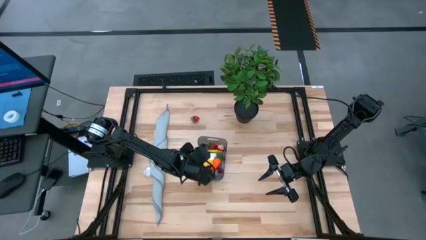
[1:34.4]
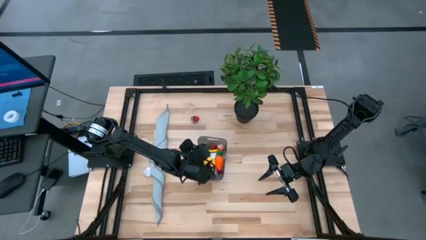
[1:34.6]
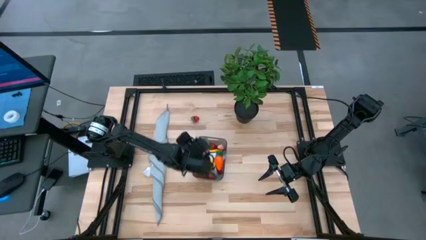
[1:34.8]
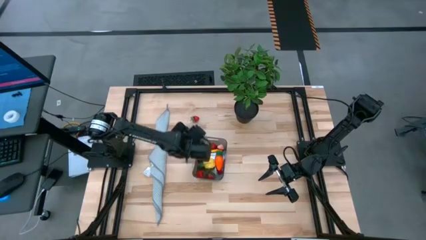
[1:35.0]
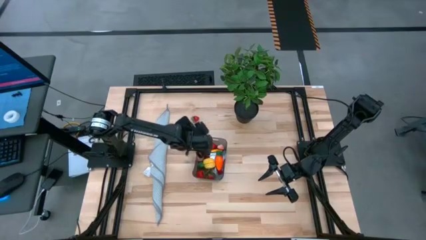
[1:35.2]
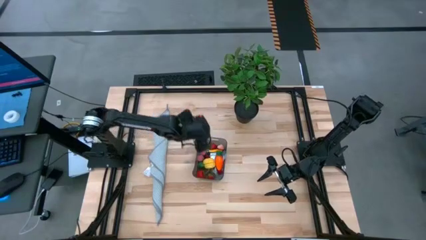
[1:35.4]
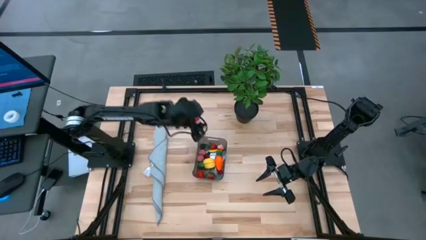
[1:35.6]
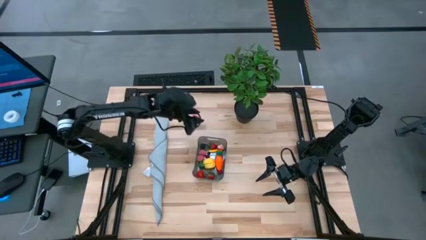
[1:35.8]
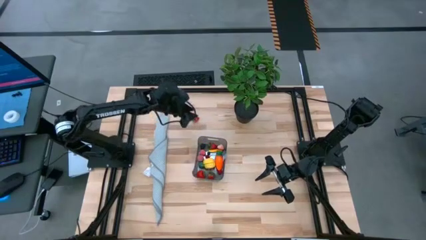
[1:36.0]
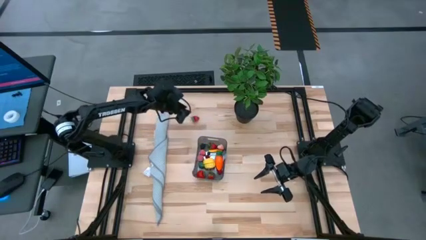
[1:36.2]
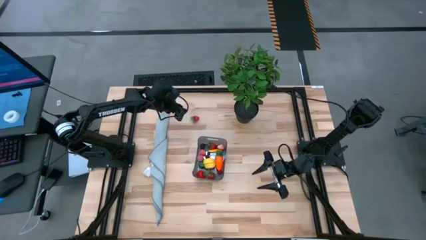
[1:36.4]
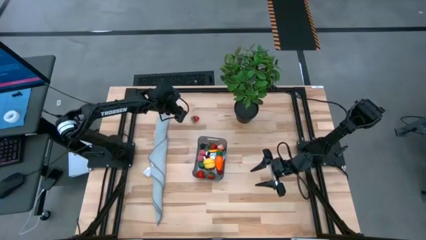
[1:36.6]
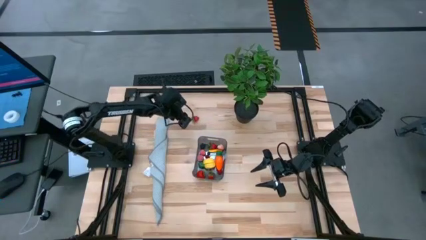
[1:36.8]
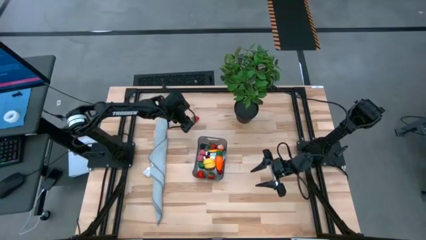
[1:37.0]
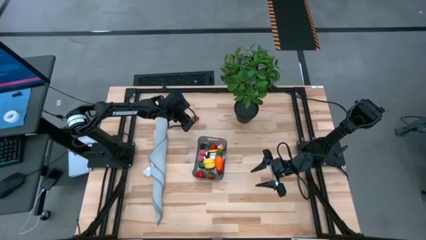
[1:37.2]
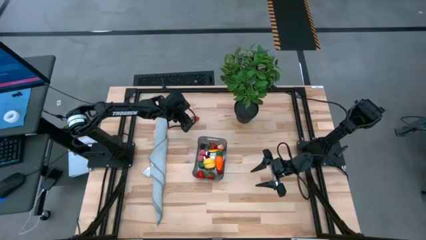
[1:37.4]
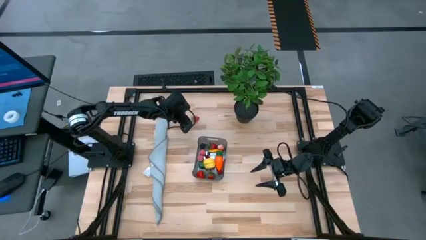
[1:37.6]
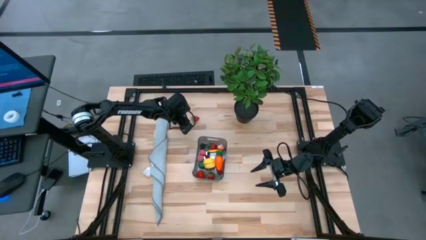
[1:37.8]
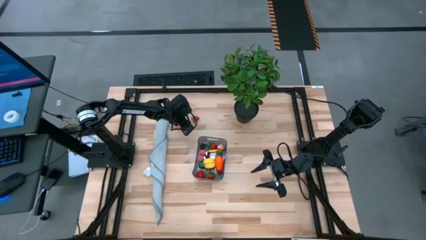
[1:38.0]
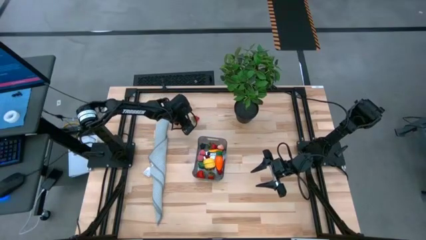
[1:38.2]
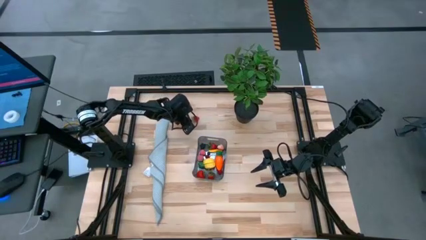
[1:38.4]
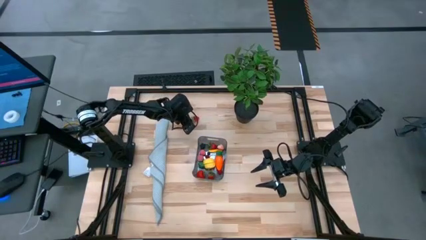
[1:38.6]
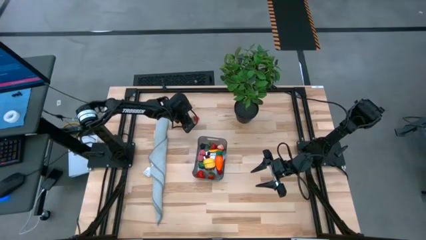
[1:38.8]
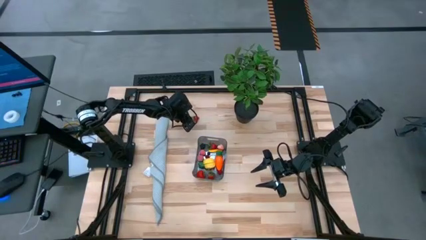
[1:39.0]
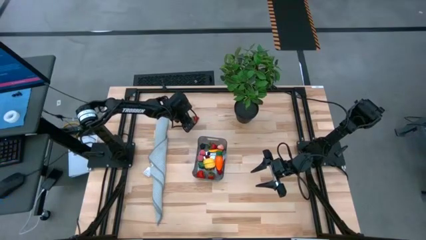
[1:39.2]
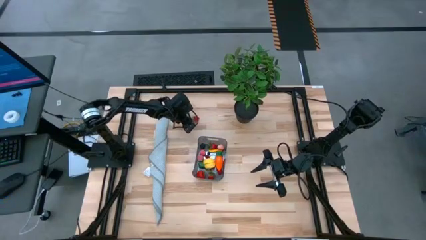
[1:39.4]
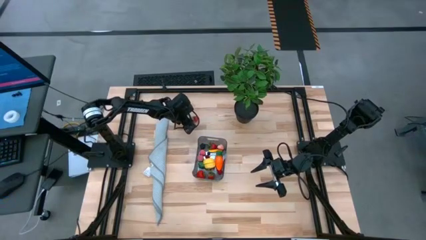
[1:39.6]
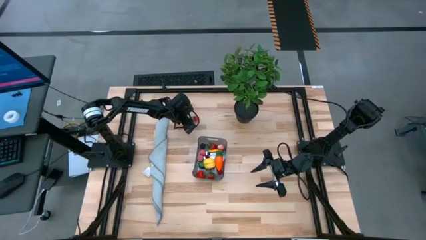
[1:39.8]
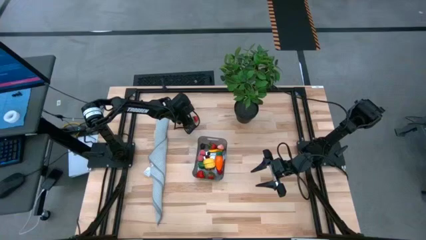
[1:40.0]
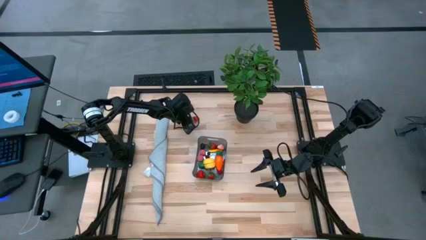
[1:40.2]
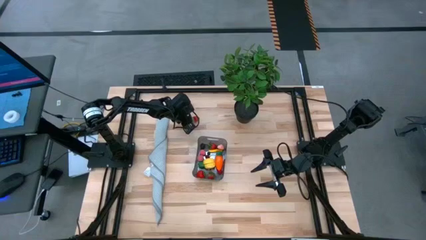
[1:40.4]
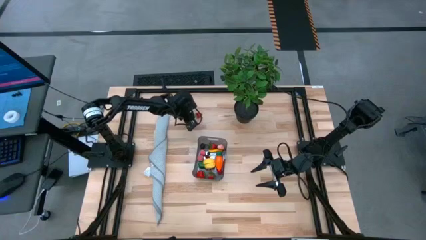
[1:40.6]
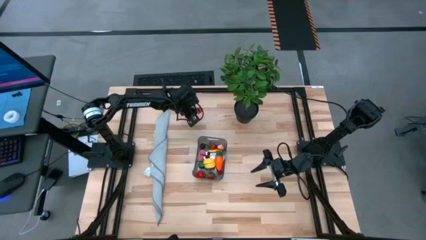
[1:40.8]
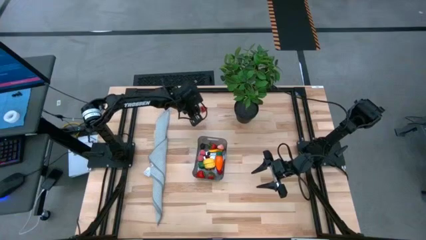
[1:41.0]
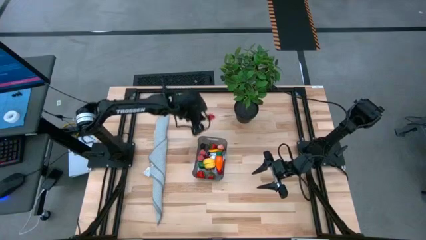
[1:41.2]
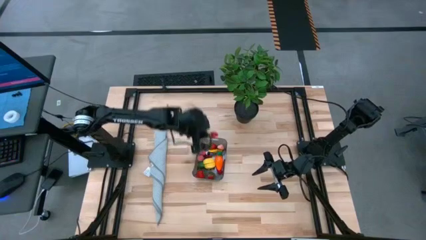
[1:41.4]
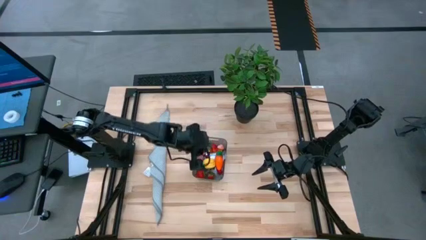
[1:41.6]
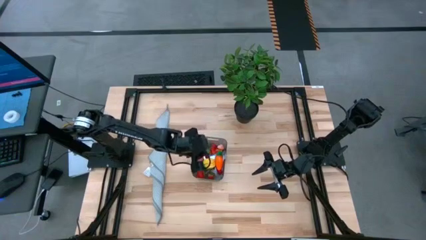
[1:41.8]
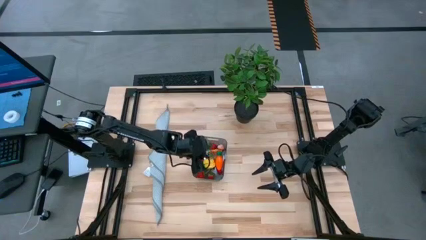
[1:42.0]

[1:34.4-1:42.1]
Task: Pick and placing Produce into tupperware
Put the strawberry into the bin

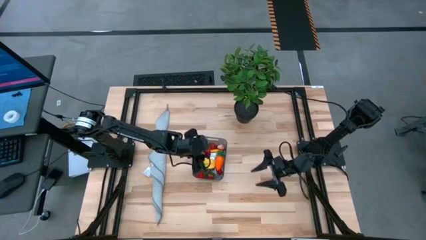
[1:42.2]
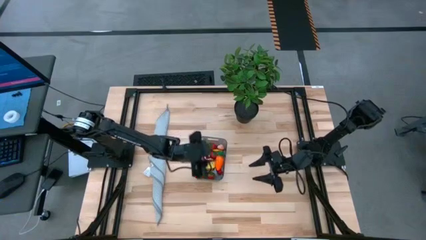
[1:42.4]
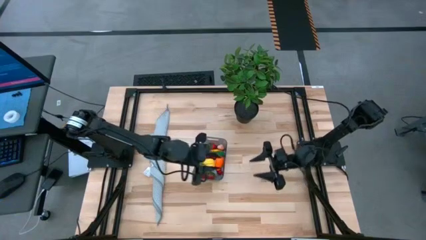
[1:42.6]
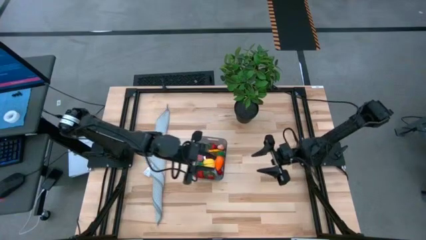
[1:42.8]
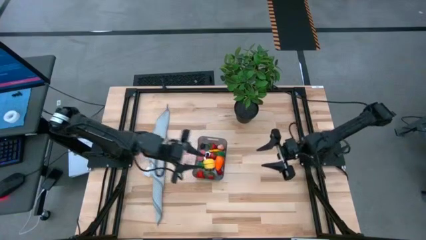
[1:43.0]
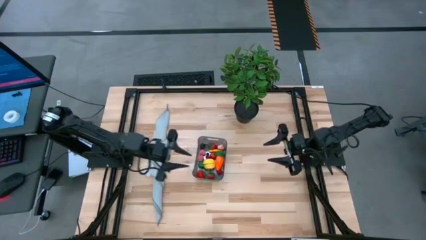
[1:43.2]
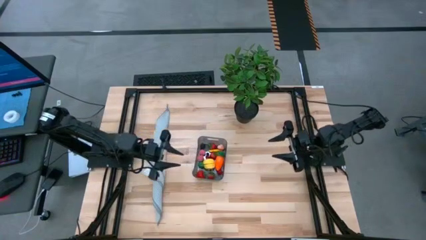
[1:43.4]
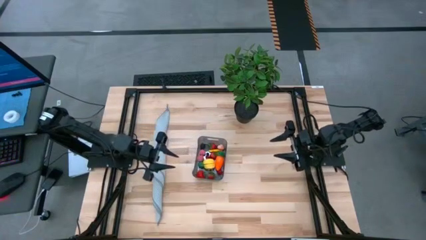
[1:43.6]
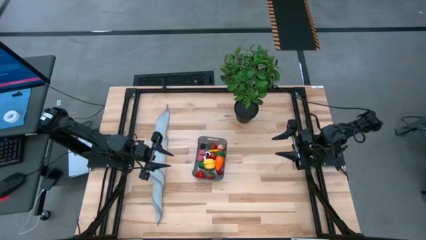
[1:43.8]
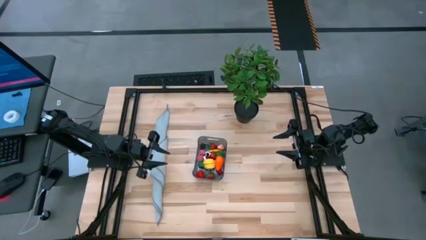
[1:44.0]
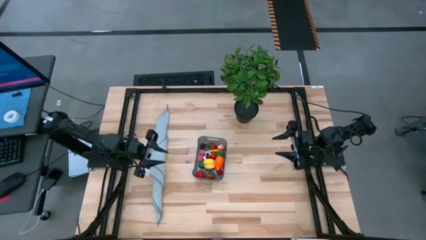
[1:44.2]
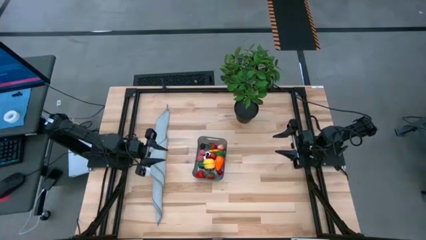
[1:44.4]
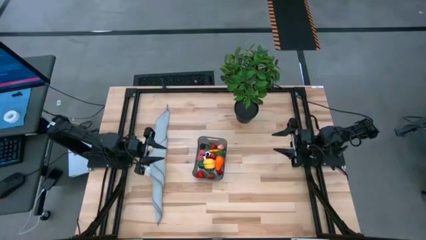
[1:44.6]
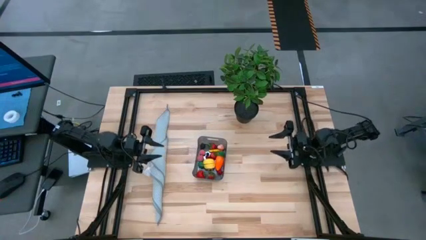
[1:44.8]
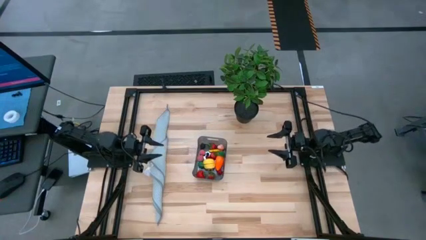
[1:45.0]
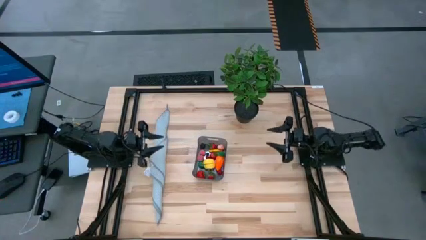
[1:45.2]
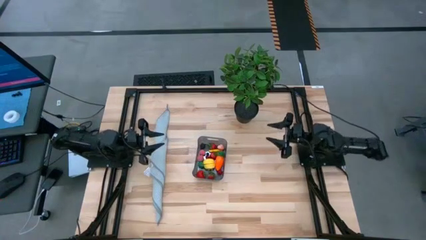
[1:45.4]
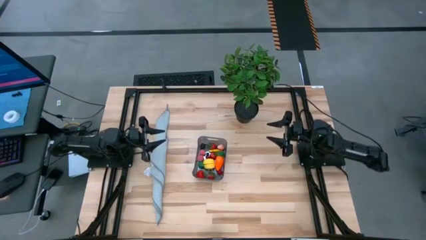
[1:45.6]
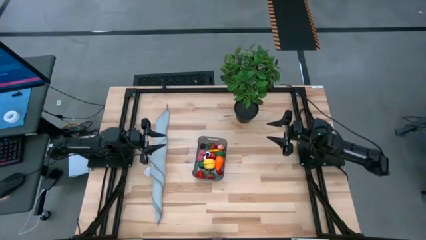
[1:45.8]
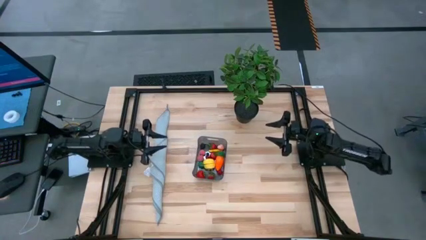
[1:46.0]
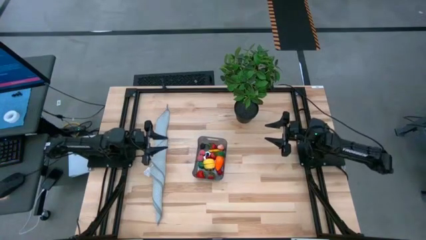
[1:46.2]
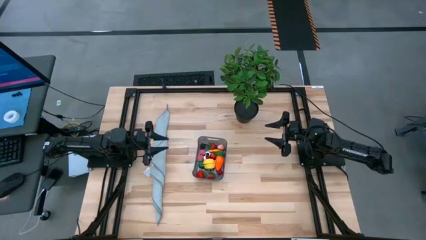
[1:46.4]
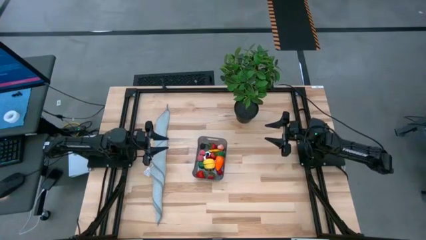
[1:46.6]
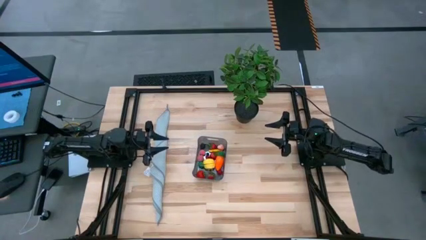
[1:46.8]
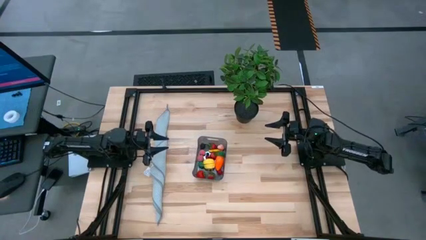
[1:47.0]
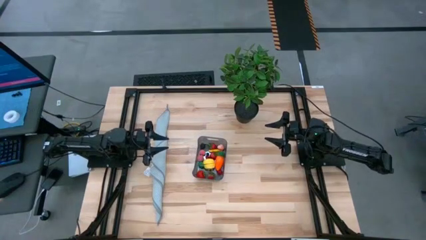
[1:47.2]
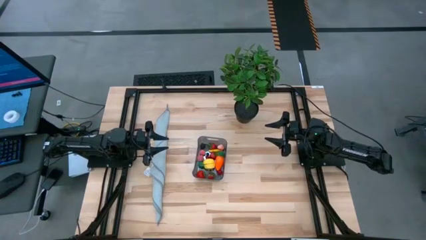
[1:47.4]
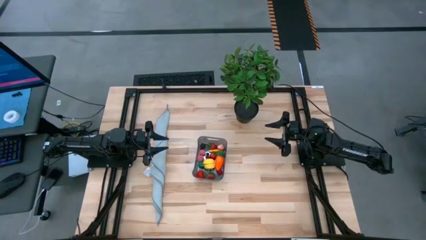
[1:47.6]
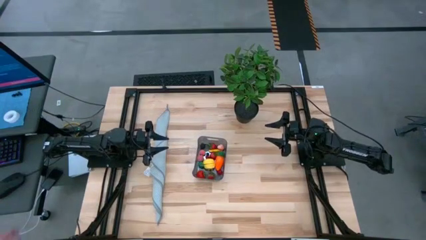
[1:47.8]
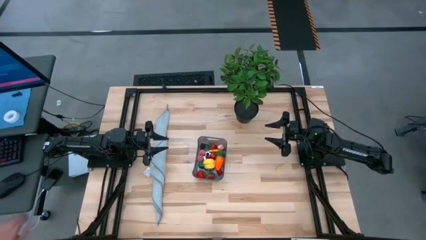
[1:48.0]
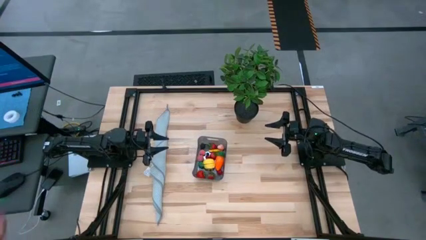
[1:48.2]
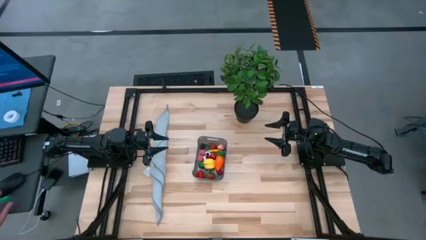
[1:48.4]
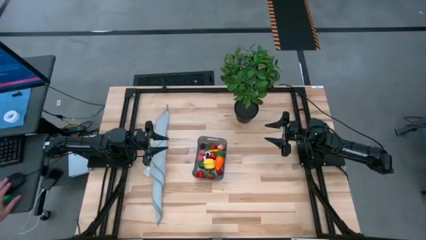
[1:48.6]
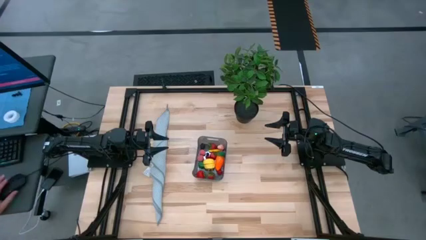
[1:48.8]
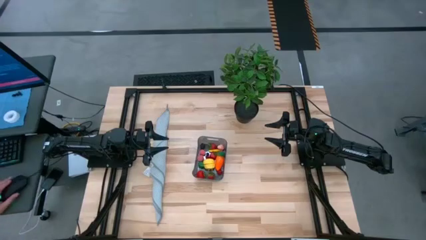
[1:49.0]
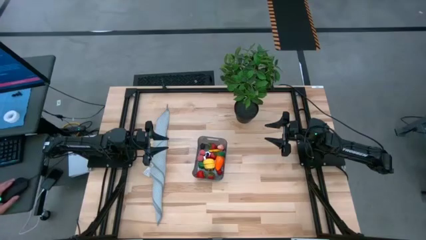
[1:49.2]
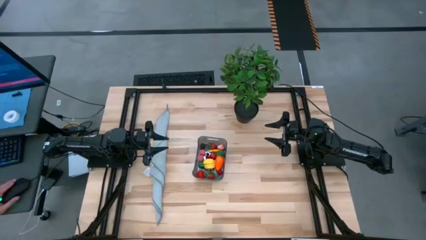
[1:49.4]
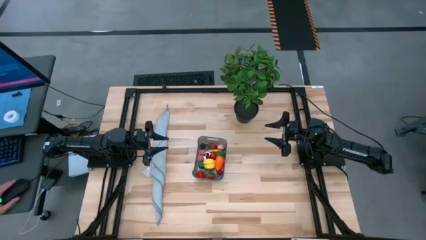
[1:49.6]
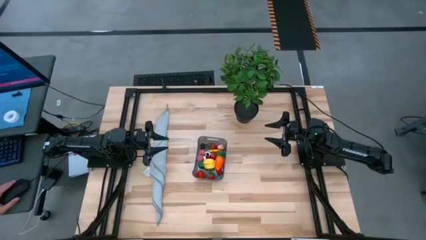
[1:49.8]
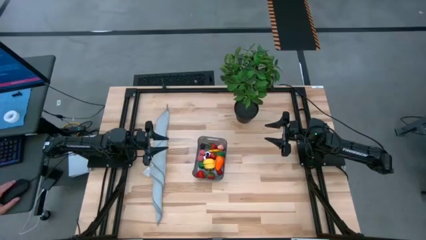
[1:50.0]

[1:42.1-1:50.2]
Return to Home Position

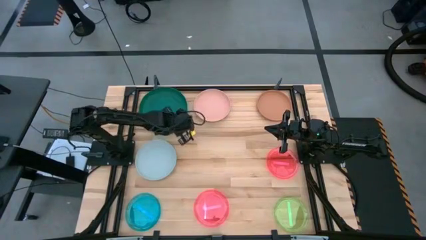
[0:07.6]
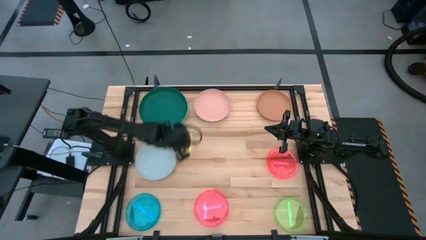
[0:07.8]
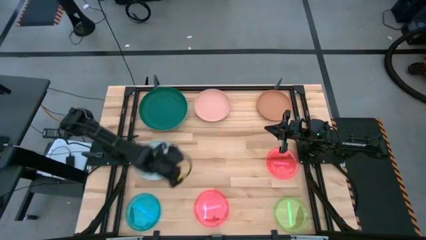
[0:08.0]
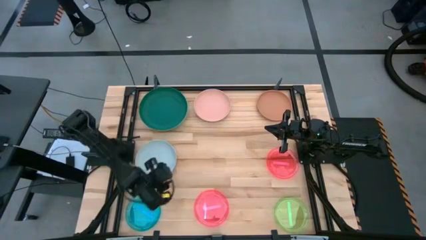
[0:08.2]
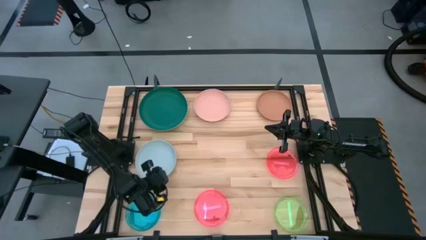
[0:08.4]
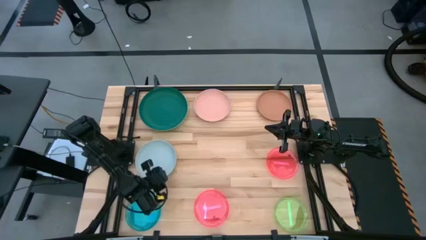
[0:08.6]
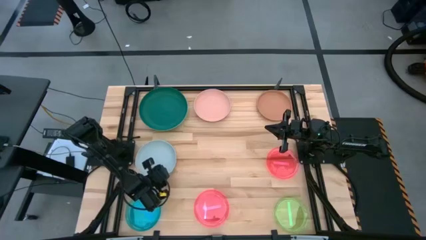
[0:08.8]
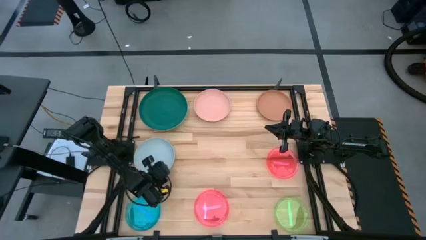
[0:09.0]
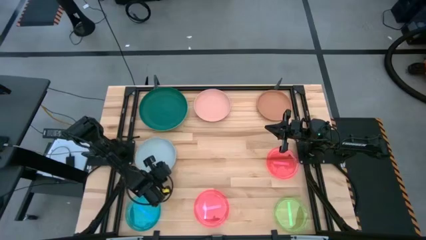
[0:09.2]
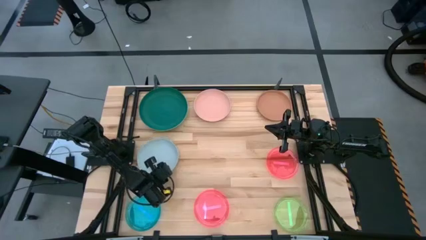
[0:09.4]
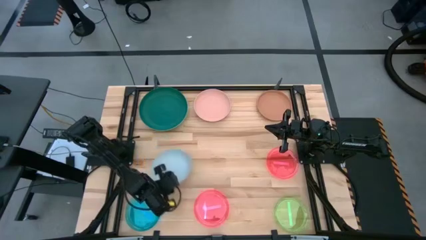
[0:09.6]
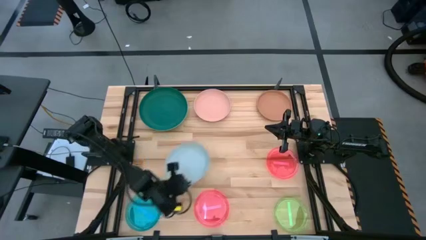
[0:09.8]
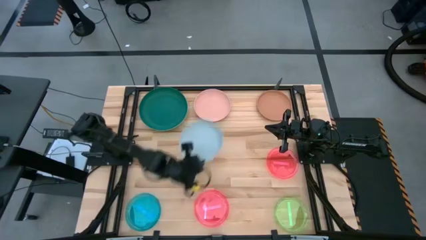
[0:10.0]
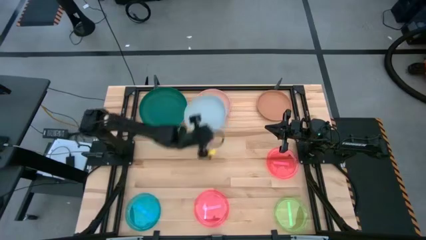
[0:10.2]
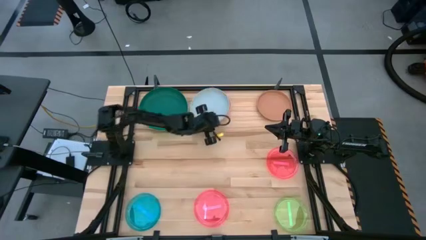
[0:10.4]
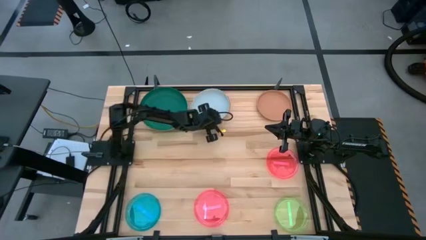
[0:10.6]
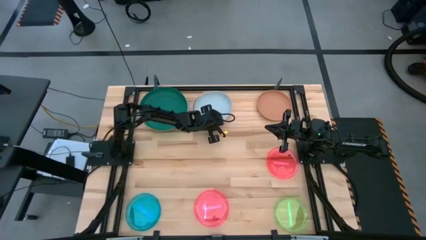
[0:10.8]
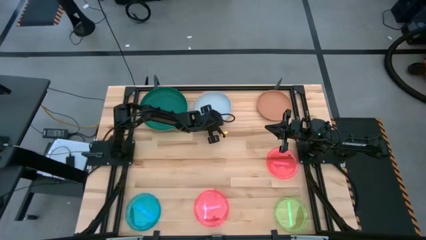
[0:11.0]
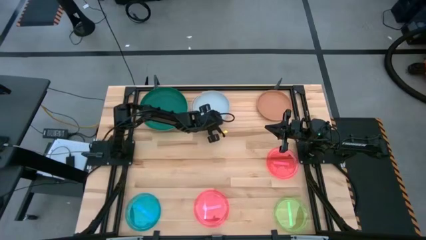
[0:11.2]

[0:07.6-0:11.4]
Task: Stack plastic plates
Stack the blue plate on top of the pink plate
